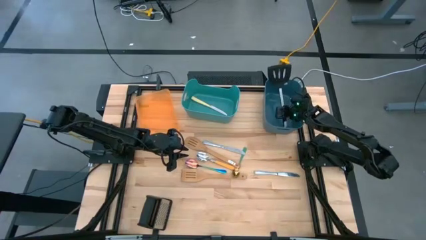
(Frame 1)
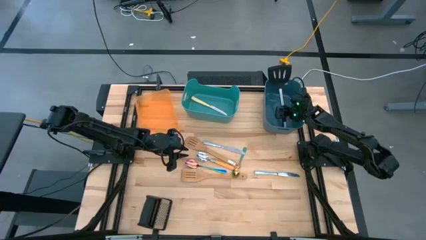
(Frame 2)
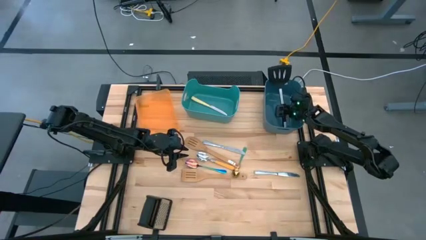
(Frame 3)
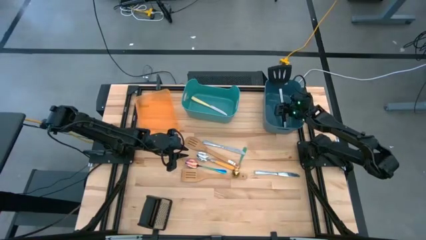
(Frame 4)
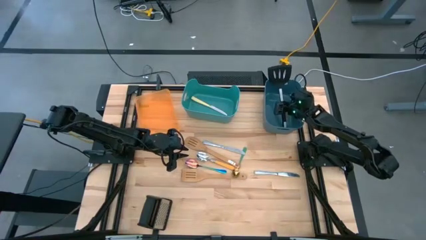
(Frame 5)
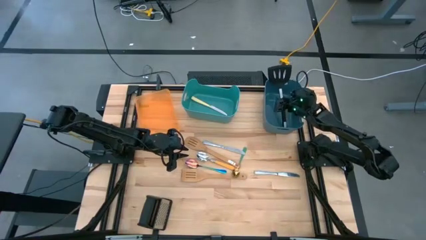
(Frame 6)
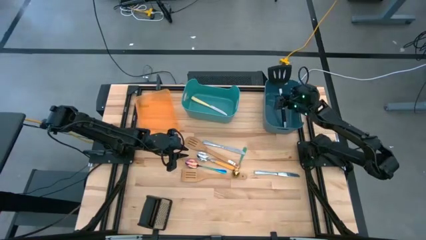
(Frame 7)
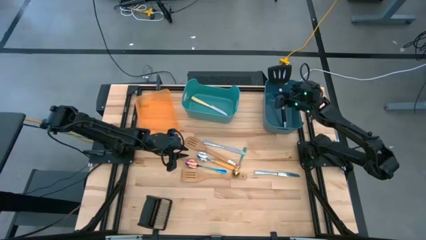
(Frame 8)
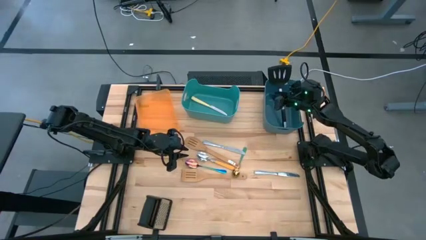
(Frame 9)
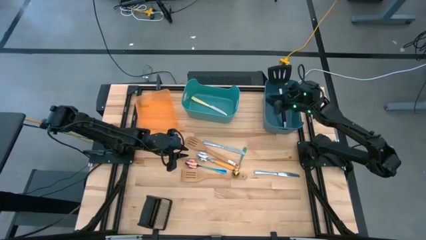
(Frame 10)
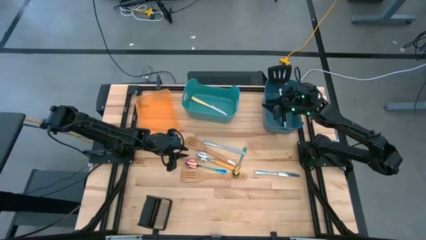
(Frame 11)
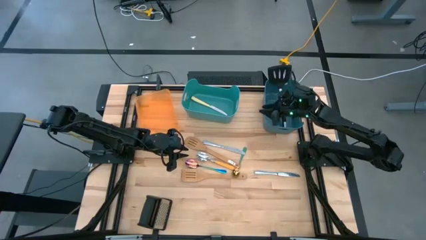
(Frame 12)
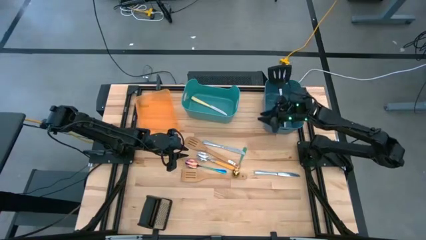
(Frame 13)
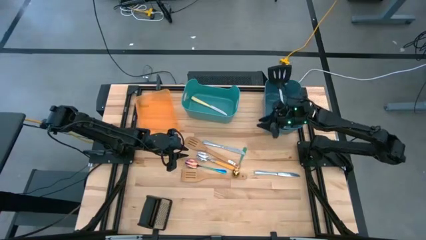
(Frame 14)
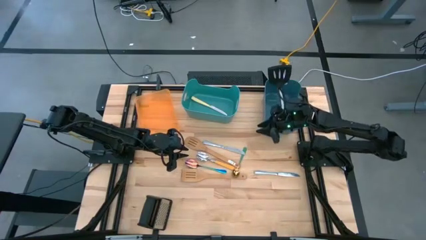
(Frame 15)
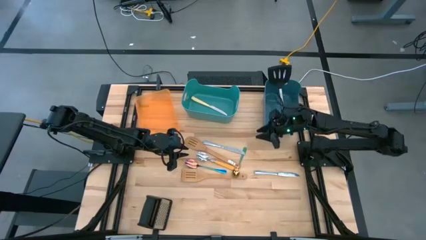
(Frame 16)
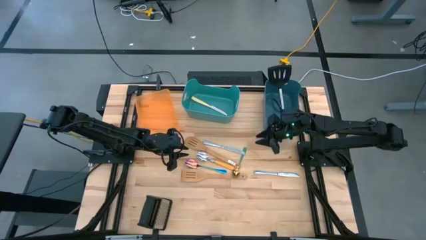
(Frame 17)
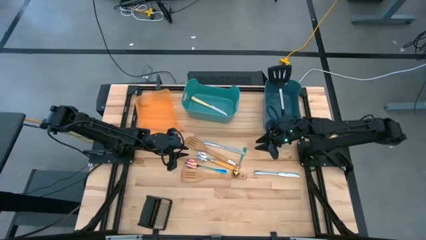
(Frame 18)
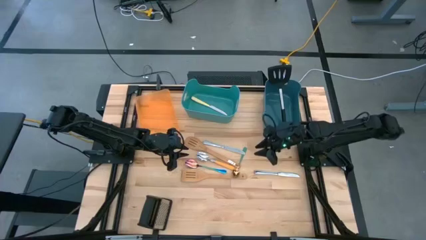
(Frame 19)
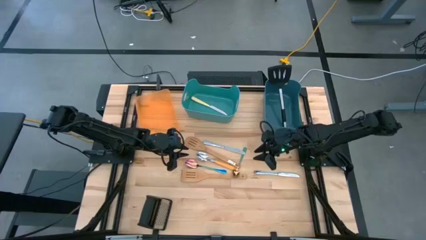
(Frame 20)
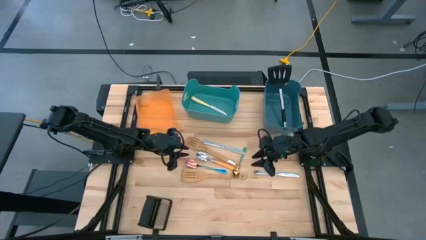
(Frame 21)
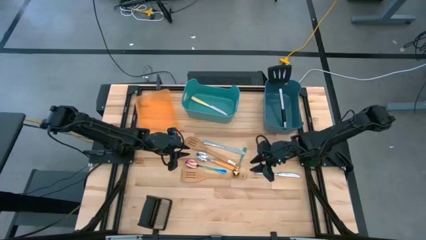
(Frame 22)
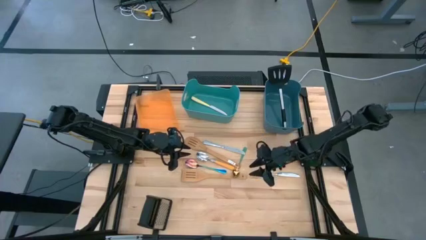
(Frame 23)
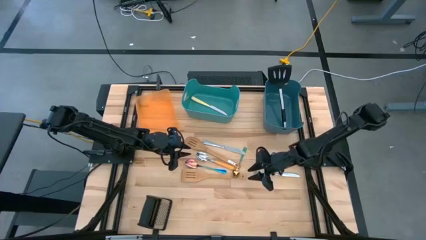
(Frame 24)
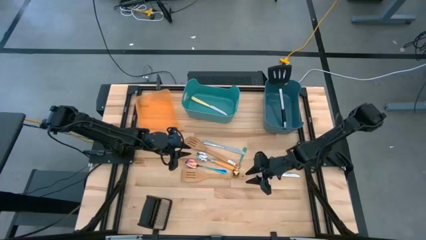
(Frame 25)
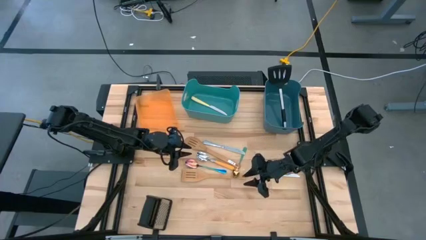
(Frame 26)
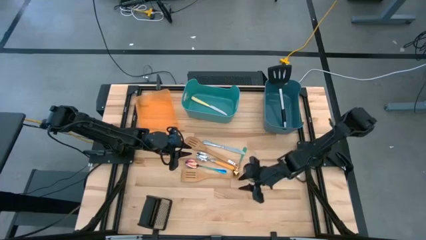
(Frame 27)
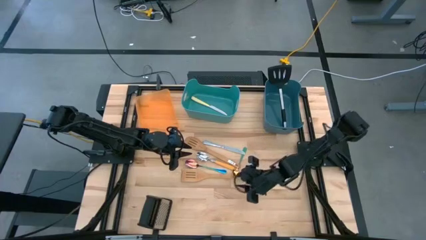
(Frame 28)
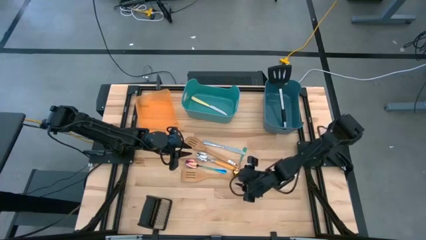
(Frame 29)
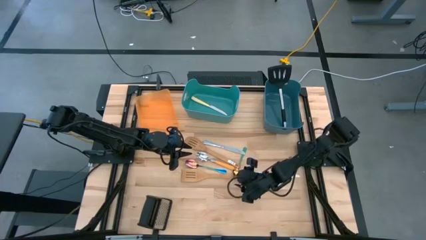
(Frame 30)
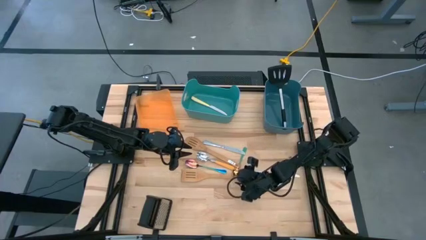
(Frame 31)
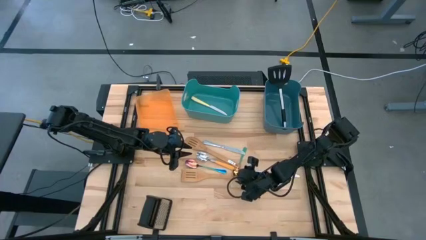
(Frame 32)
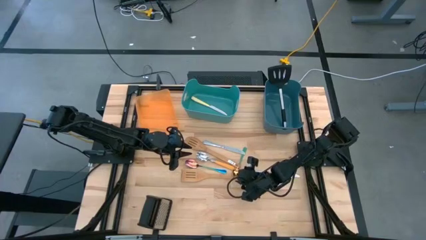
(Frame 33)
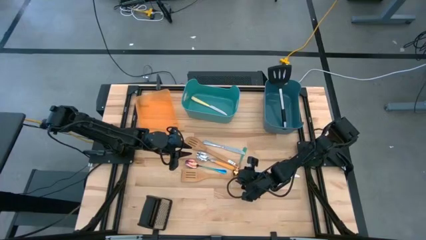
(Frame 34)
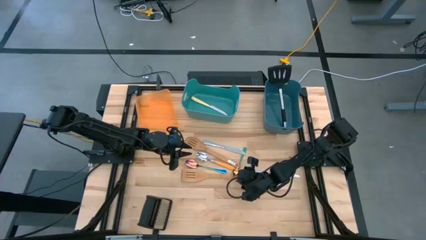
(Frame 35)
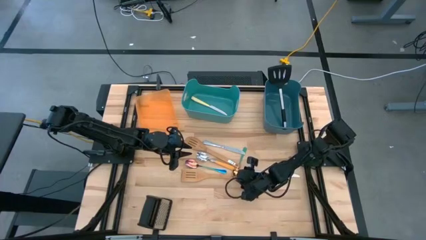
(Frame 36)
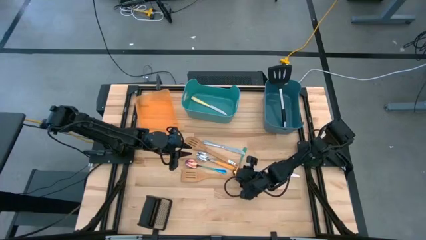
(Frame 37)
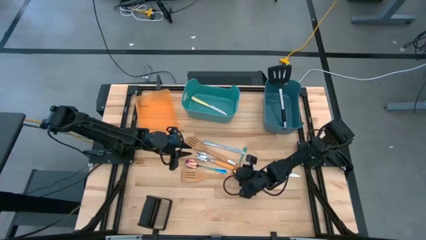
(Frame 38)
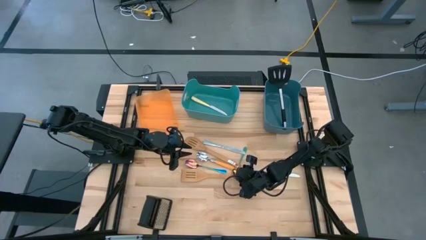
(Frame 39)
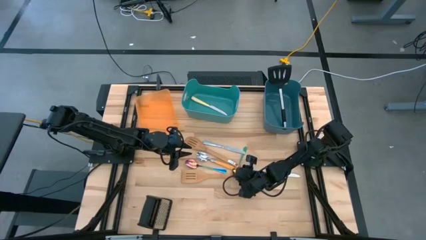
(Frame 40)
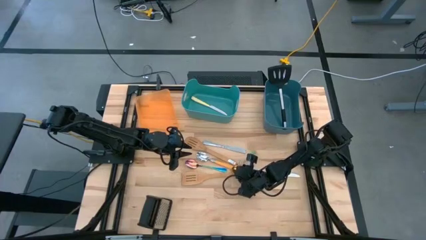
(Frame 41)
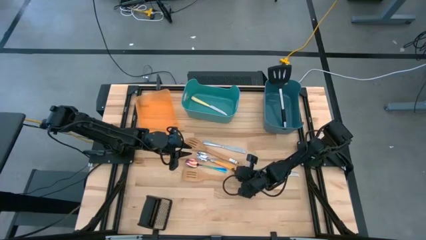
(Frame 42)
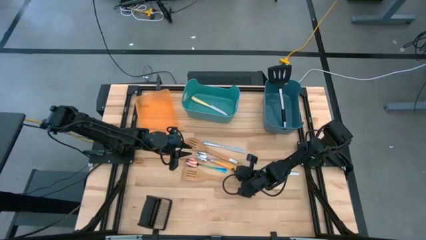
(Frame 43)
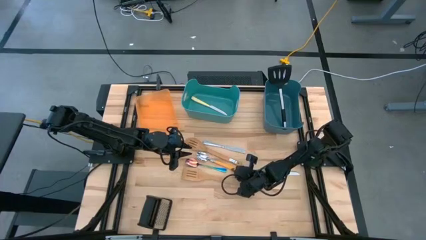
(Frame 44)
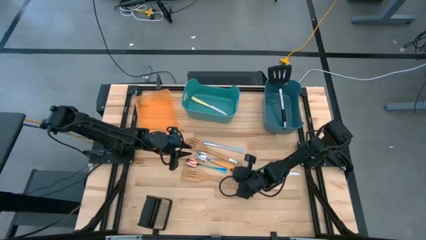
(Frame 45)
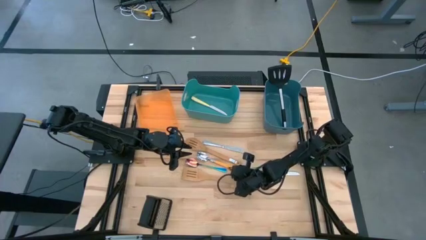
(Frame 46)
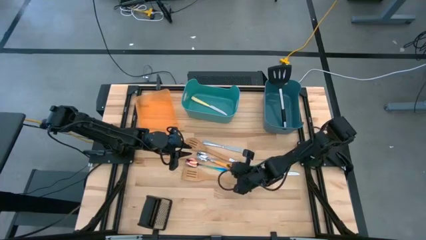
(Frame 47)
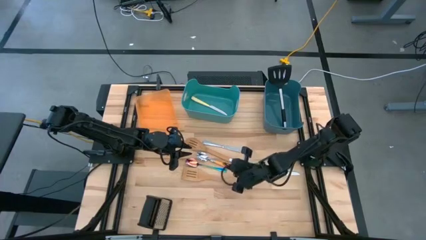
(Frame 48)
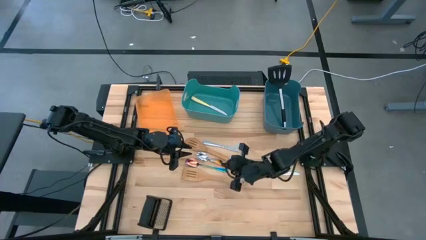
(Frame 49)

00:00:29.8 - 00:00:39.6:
Task: Pick & Place Kitchen Items
Put the green spoon into the orange bin

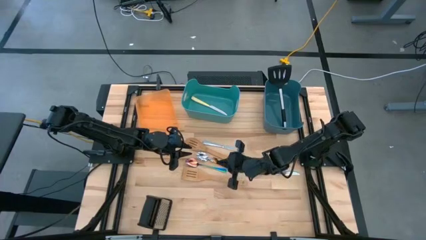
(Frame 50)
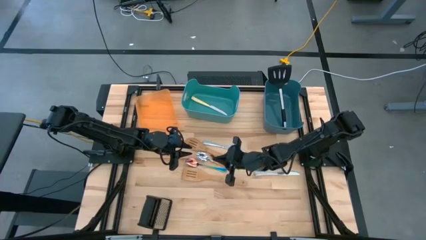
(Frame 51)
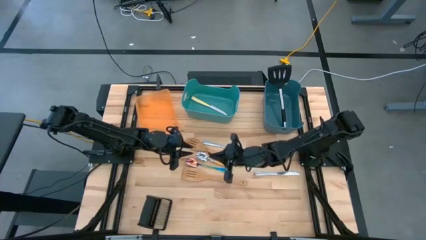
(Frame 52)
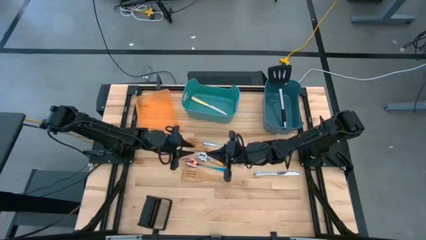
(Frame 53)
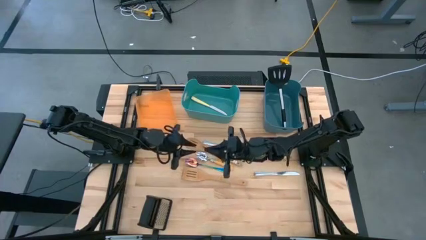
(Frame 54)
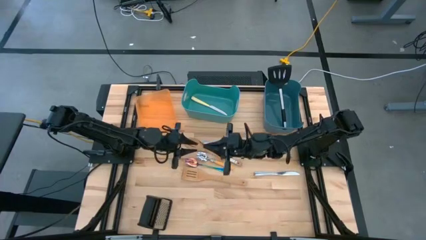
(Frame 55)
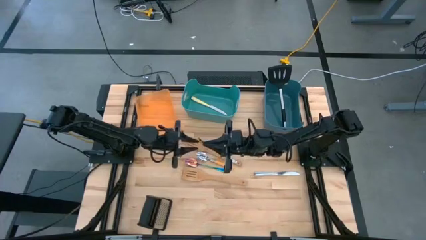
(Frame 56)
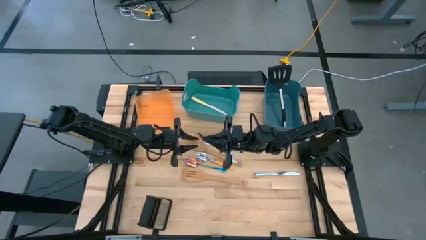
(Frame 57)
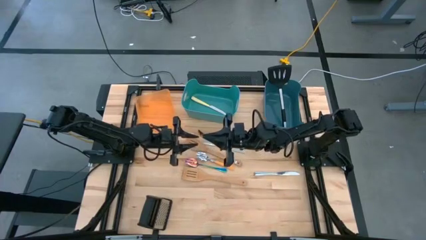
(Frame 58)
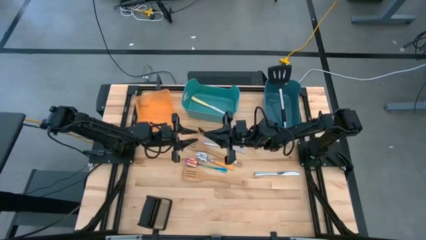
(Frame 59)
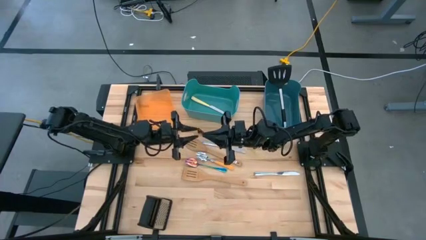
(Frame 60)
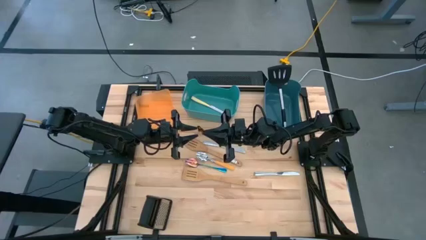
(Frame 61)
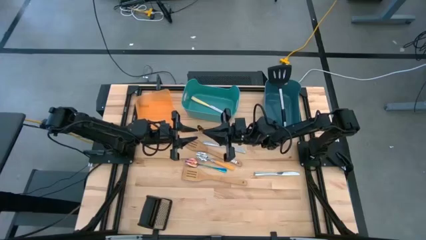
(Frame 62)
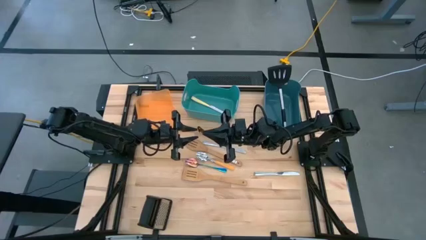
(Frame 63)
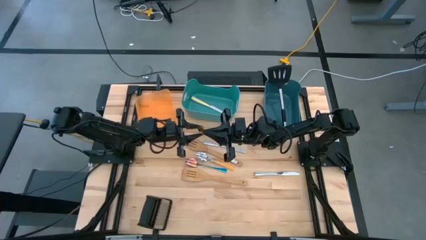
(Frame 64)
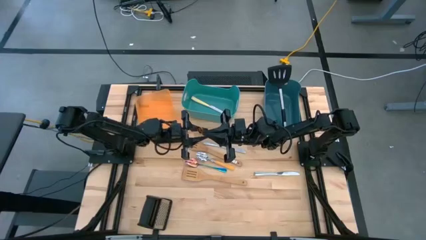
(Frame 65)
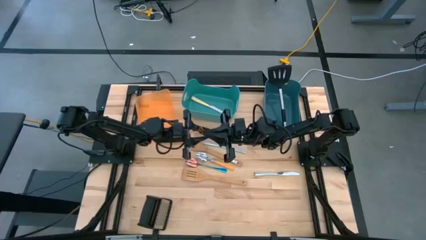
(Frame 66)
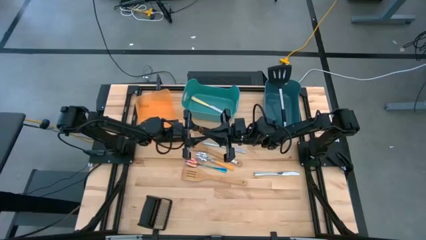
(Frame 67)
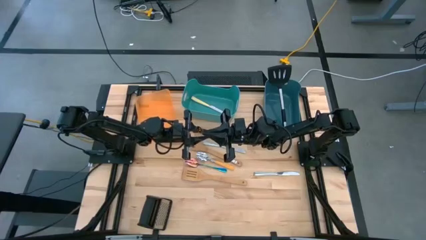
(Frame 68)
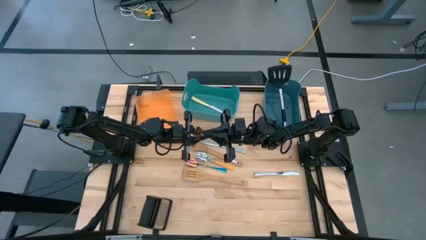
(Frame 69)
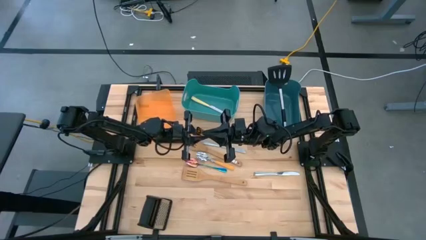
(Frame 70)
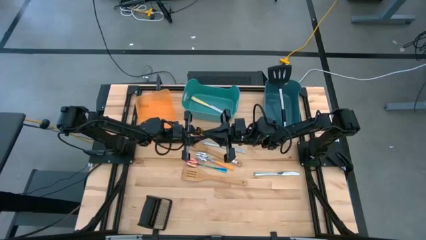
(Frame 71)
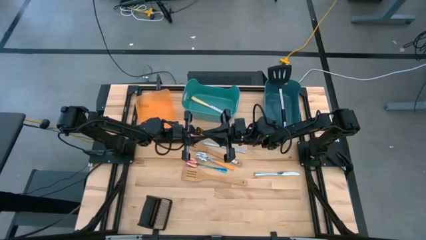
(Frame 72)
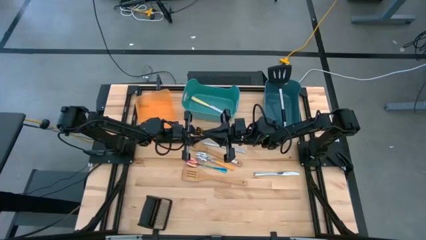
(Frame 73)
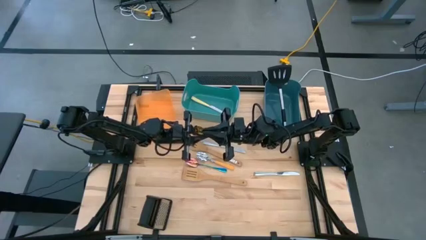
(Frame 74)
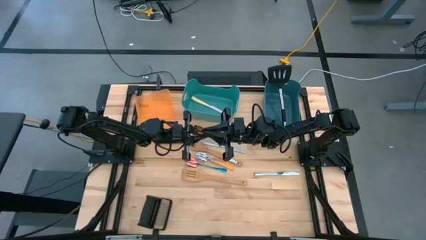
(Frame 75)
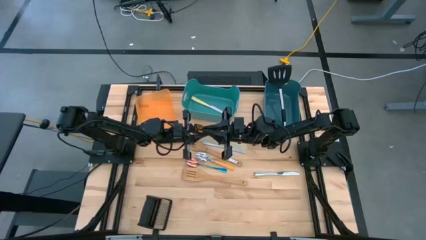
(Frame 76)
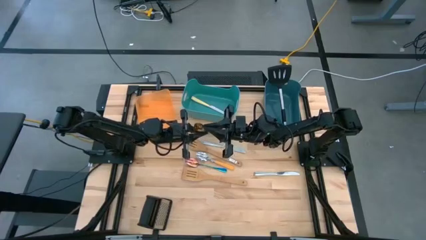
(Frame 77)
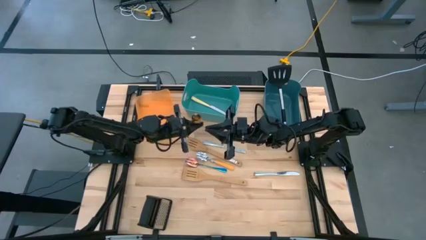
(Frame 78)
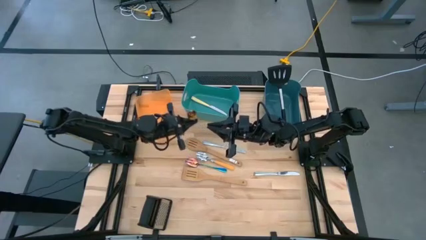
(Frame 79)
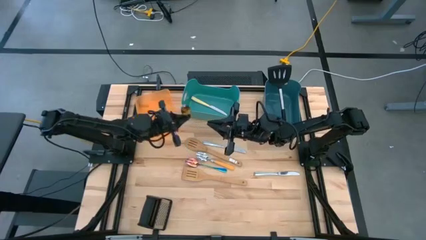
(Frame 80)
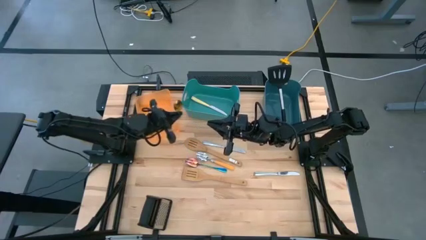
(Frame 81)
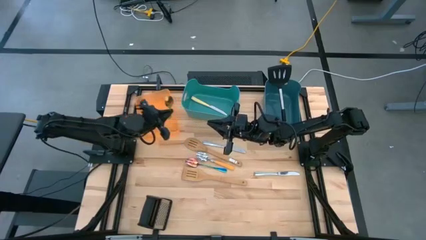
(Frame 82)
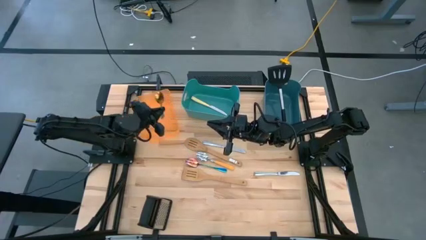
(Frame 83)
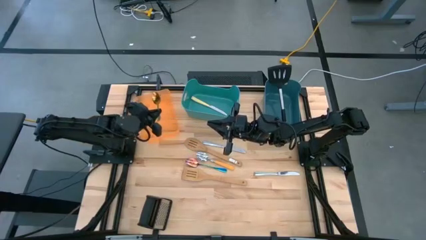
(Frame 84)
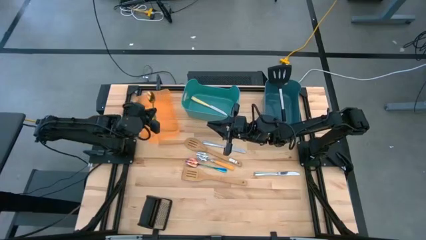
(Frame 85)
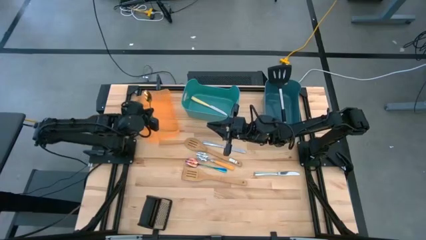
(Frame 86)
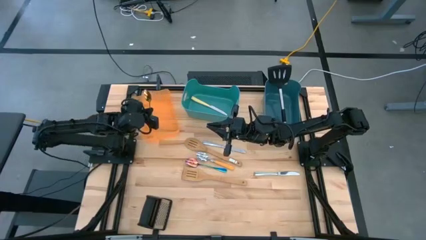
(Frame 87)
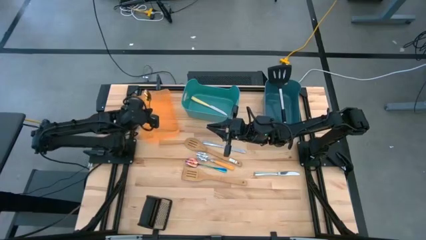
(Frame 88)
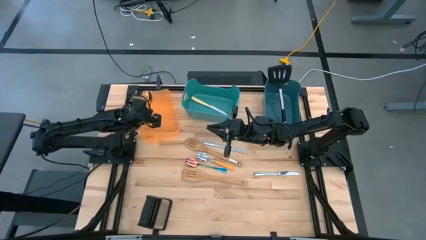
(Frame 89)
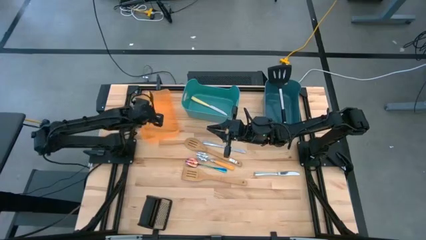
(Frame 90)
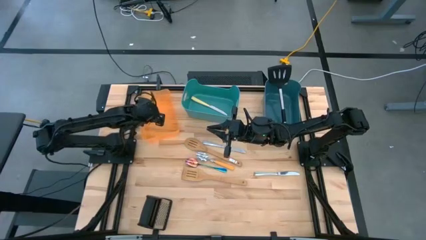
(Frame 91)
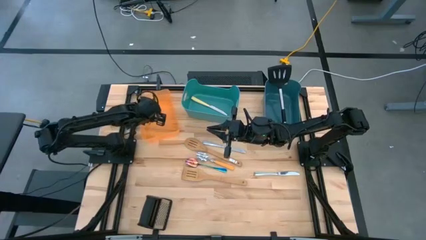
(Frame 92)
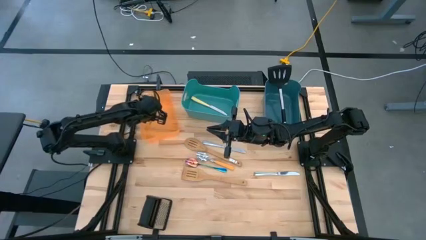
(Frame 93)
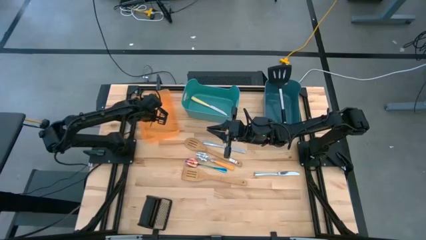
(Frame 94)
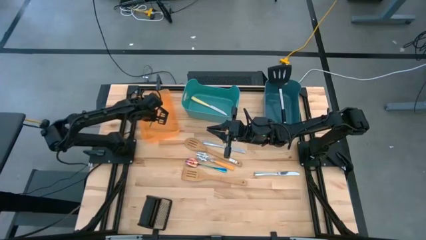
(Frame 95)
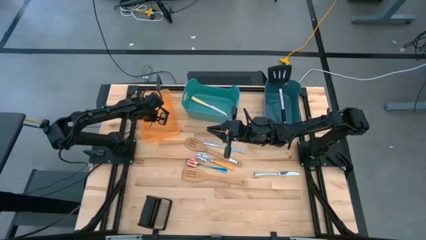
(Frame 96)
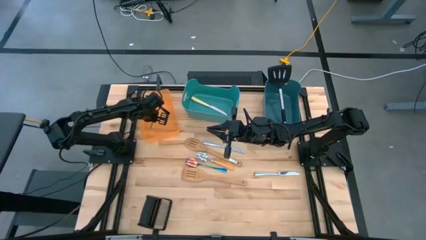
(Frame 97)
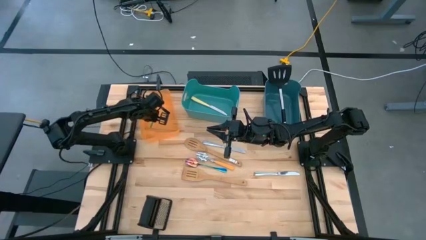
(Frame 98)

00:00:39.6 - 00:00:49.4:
Put the green spoon into the orange bin
